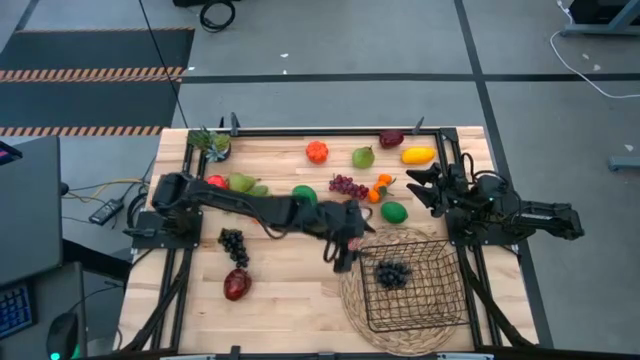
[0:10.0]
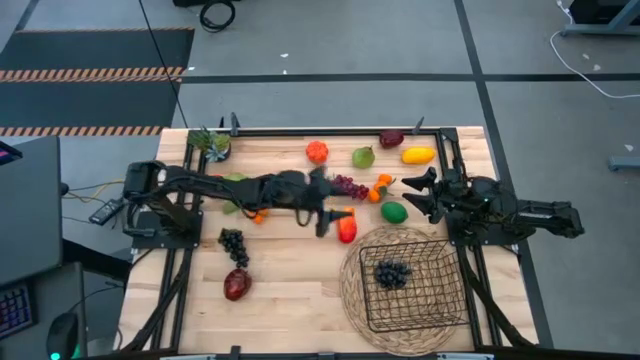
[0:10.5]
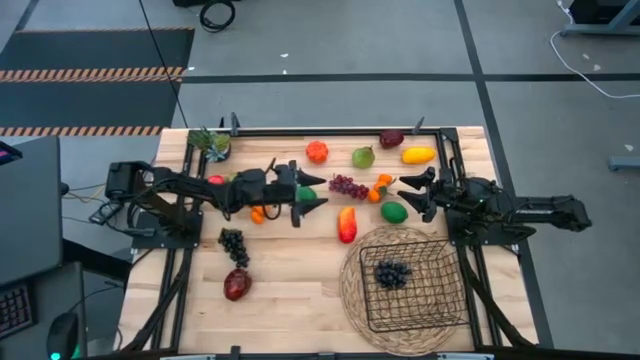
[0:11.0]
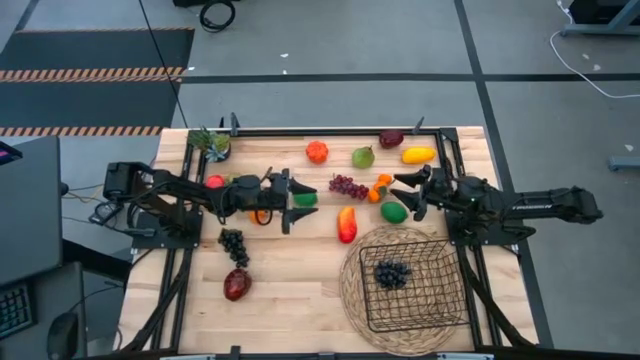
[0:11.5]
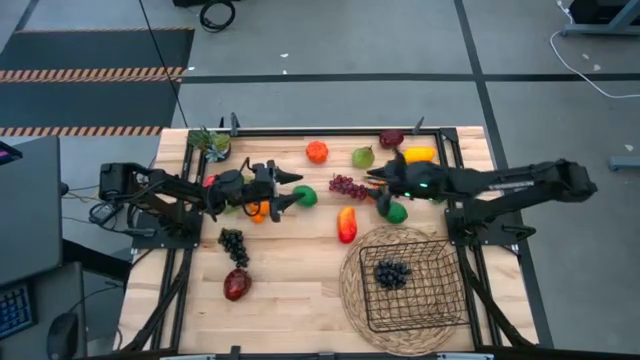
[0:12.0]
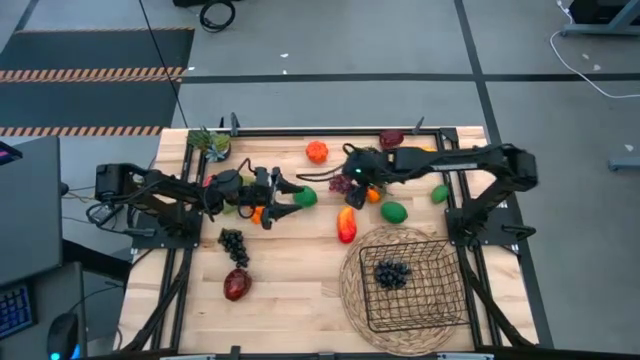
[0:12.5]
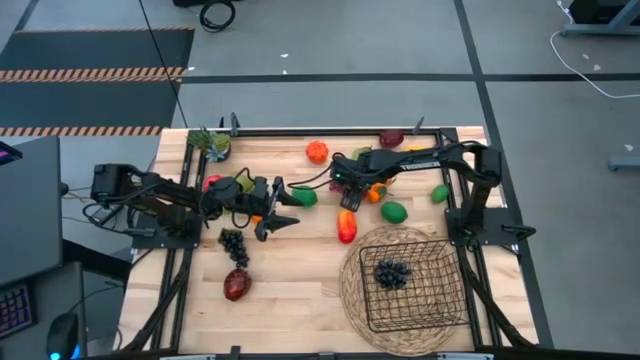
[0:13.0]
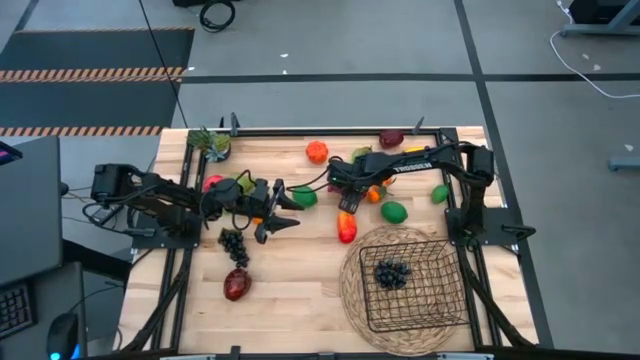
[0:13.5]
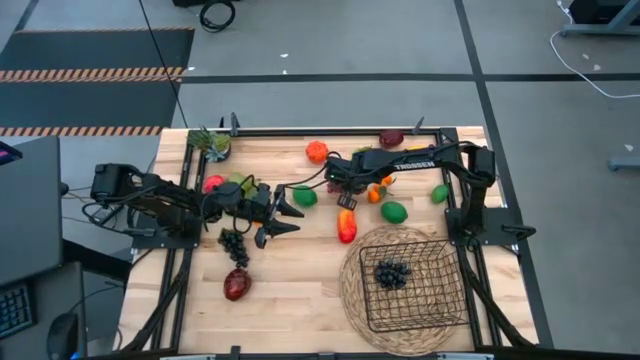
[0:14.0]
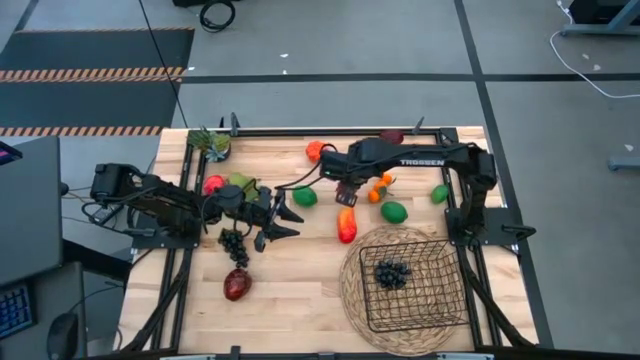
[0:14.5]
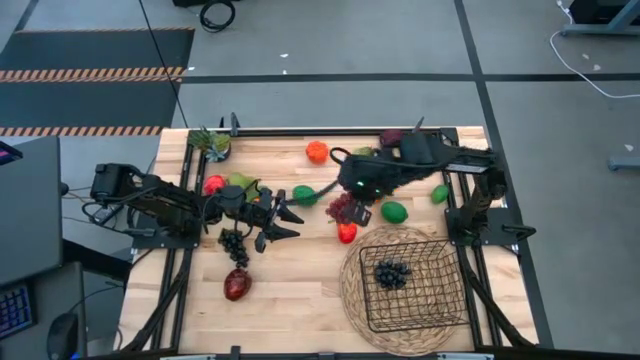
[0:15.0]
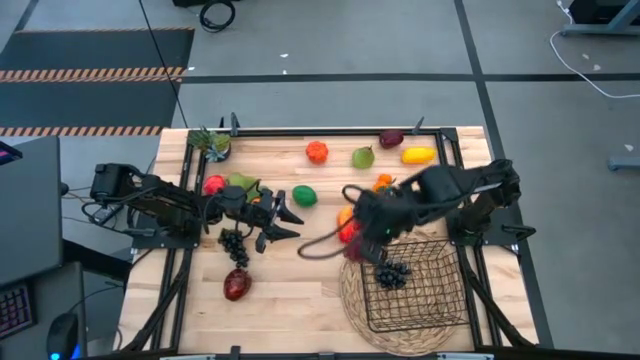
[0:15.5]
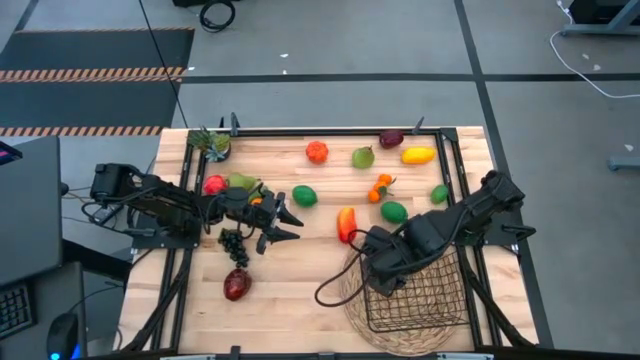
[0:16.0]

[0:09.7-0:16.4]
Task: Build produce basket
Put the red grapes into the black wire basket

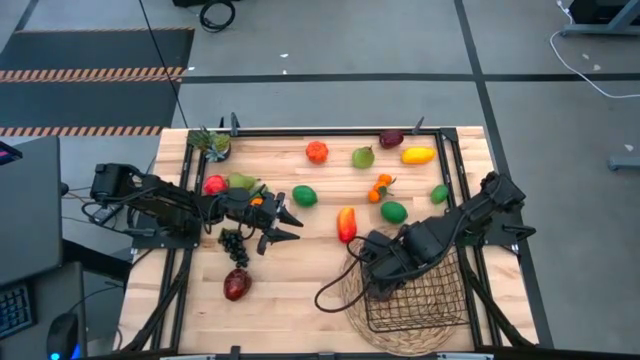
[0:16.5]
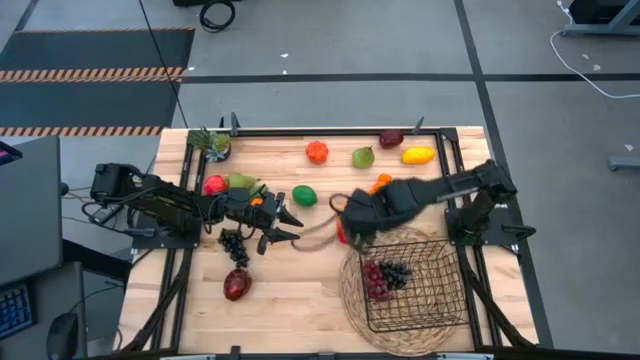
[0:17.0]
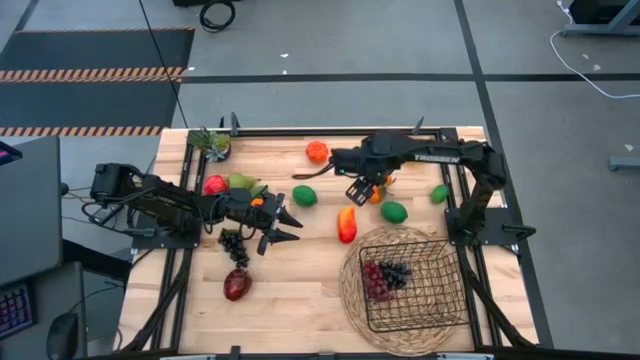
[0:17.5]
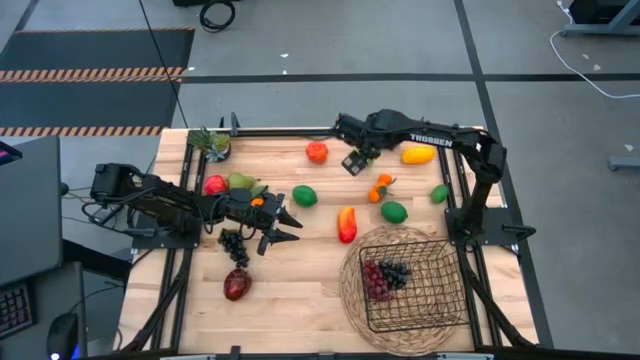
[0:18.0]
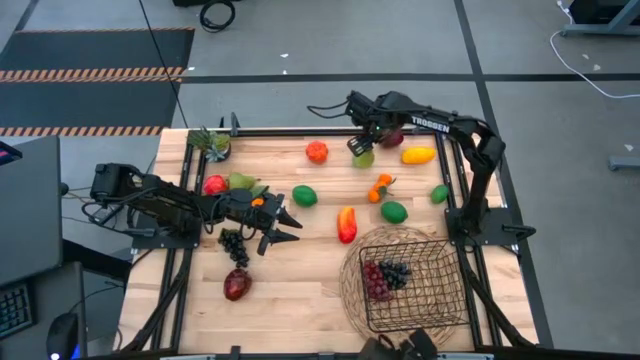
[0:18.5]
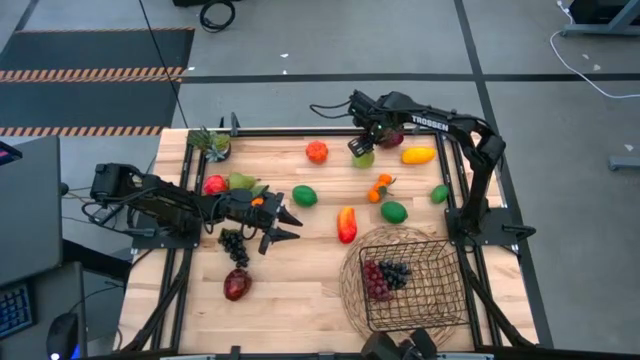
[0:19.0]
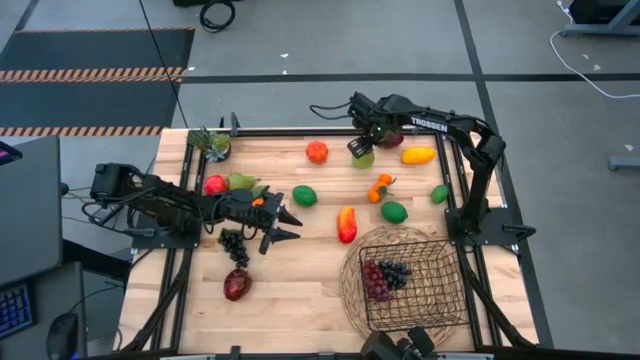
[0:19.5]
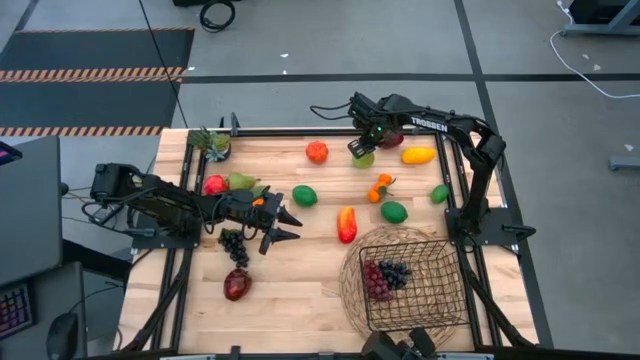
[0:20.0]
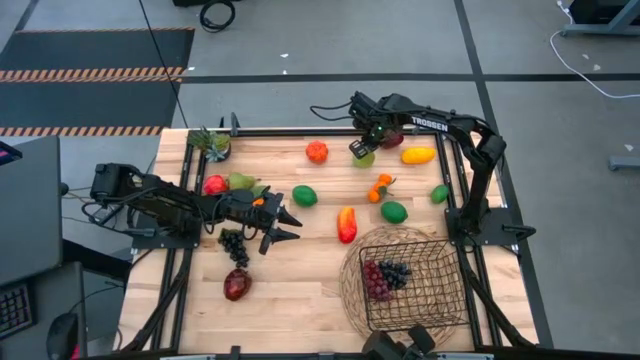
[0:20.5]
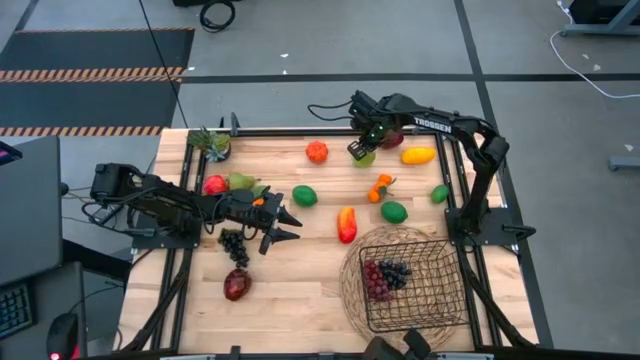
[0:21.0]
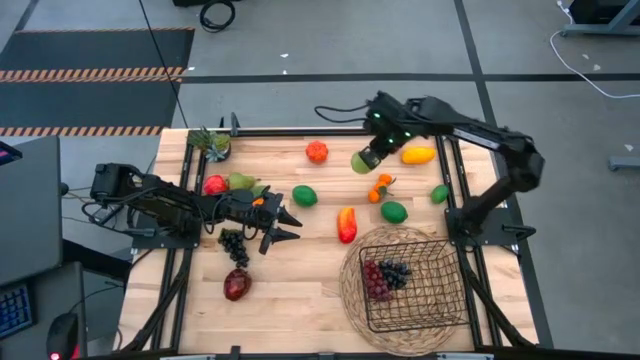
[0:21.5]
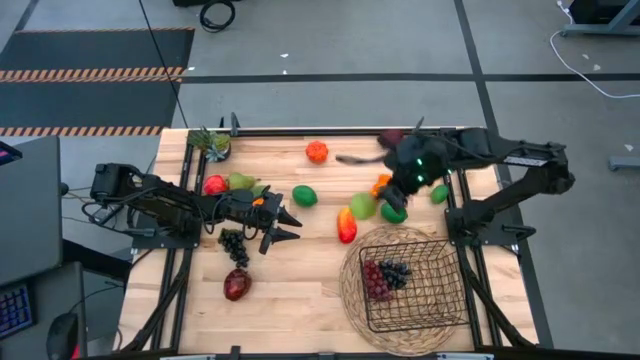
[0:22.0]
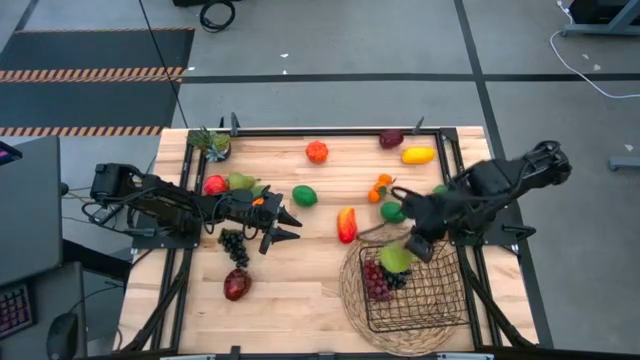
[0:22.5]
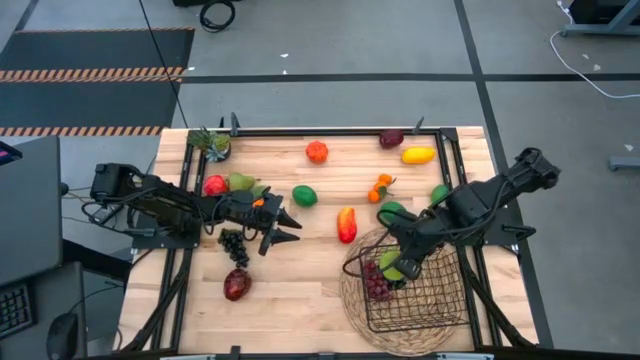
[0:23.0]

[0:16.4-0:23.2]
Put the right green pear into the black wire basket

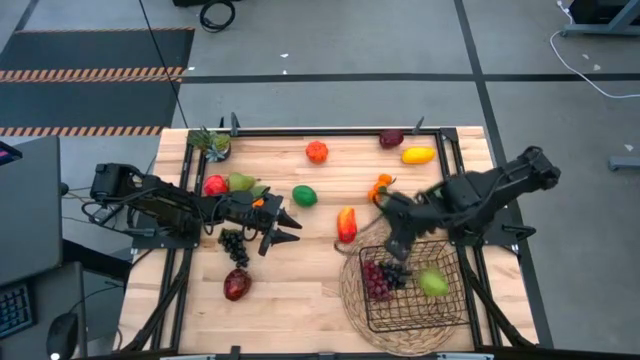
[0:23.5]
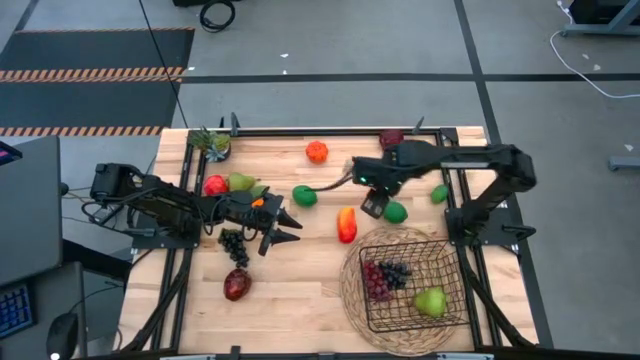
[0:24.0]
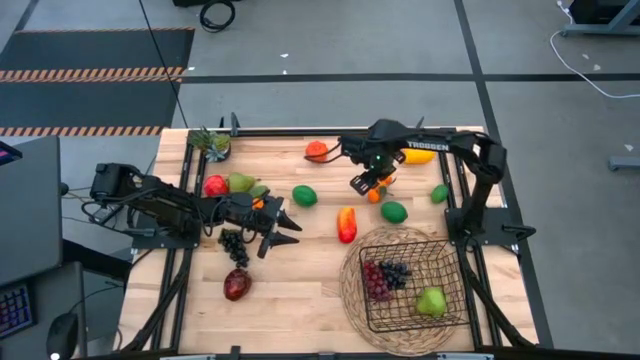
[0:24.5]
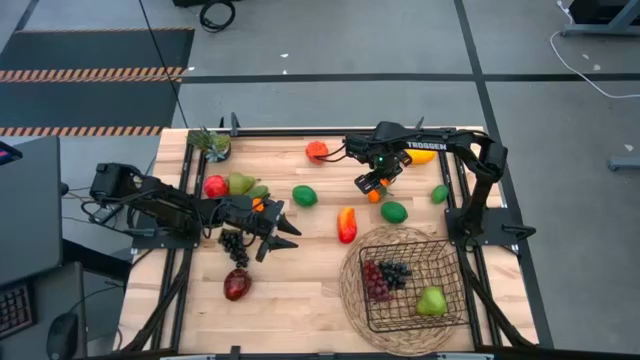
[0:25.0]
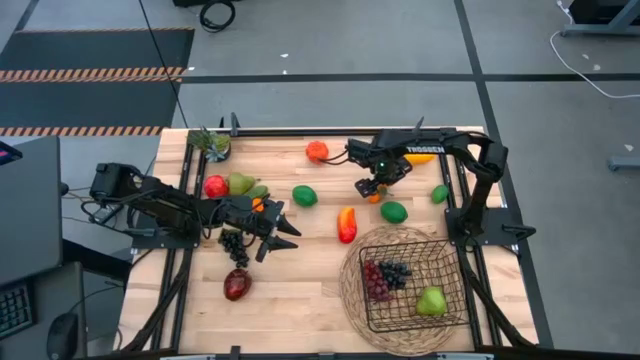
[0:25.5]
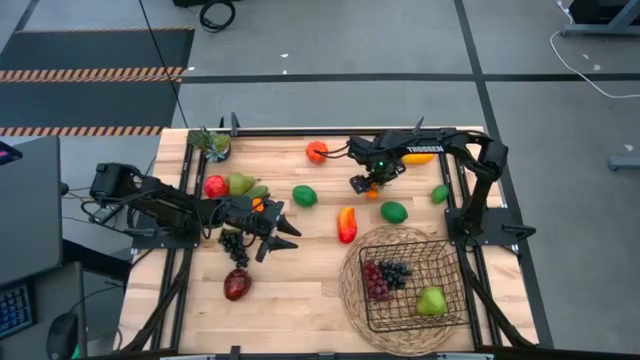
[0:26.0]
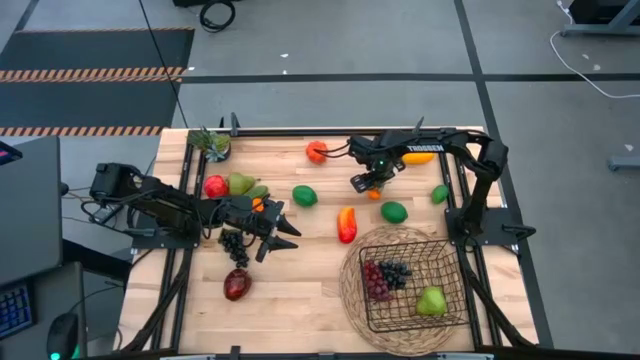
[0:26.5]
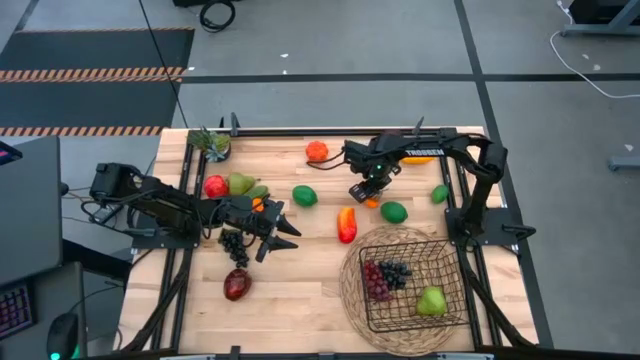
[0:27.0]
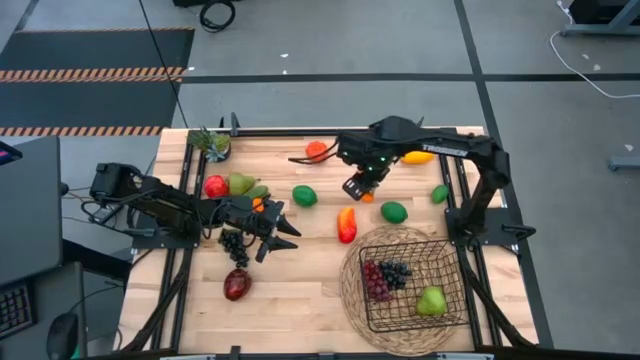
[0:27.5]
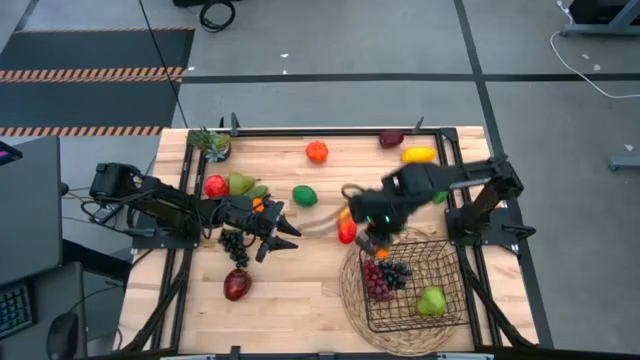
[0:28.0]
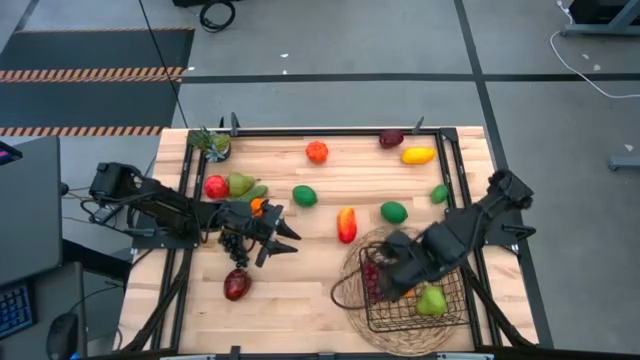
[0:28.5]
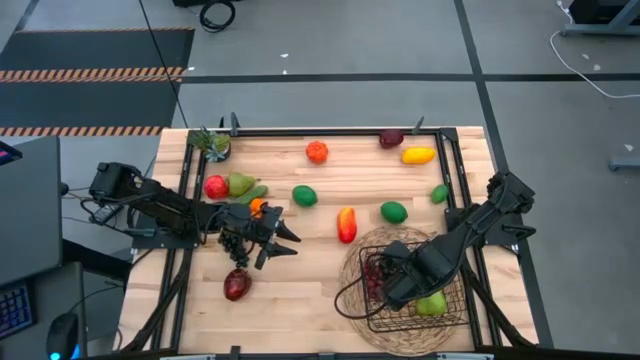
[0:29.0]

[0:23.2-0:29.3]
Put the right orange tangerines into the black wire basket

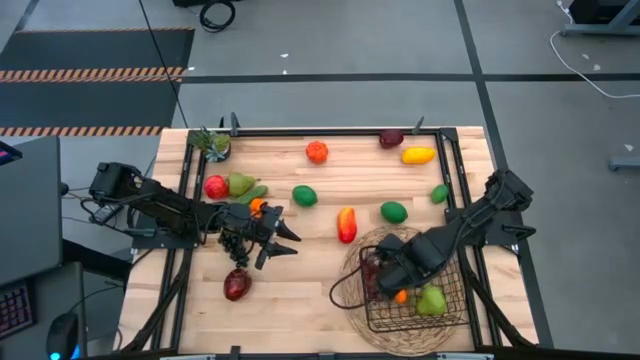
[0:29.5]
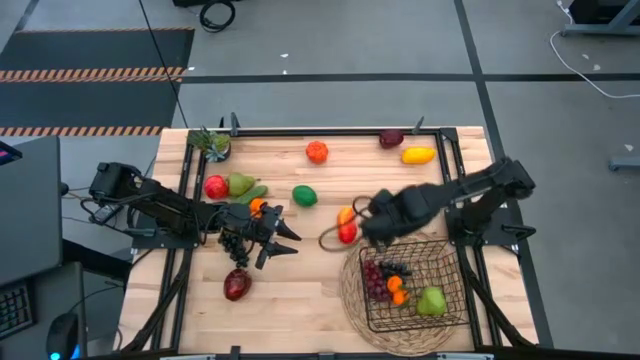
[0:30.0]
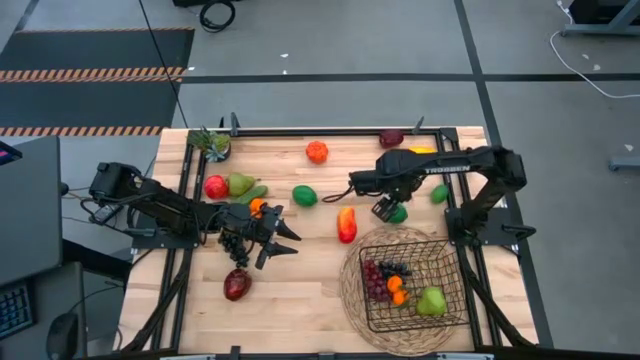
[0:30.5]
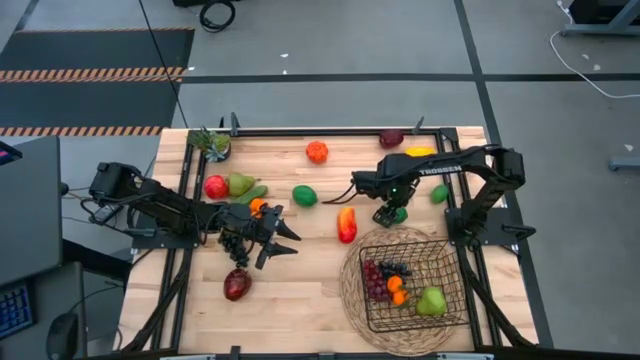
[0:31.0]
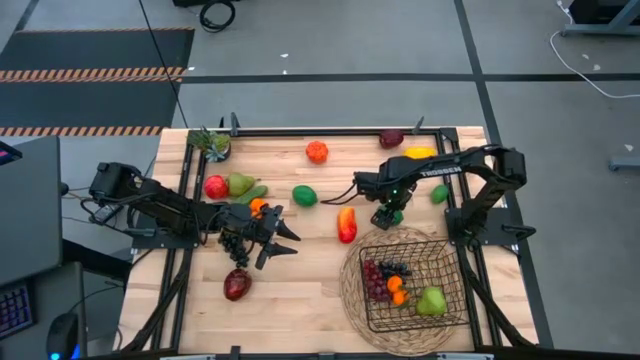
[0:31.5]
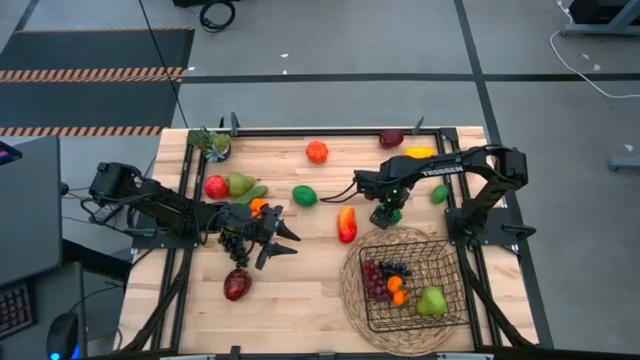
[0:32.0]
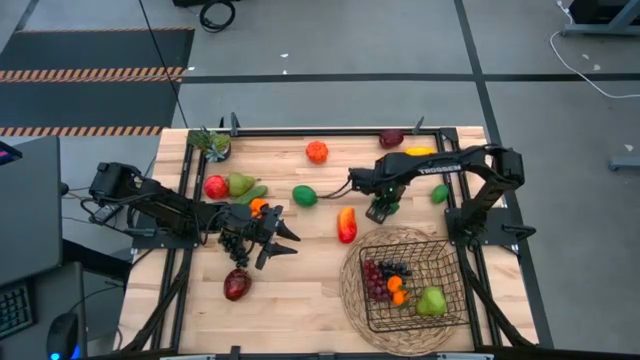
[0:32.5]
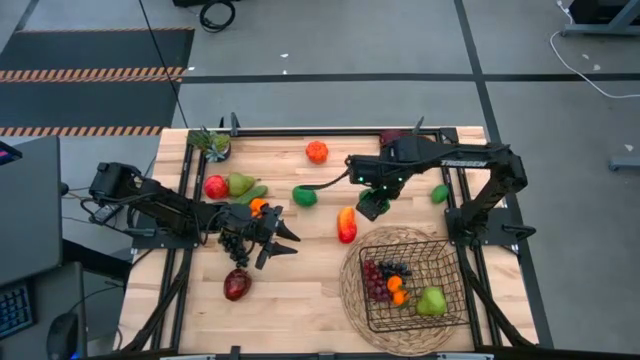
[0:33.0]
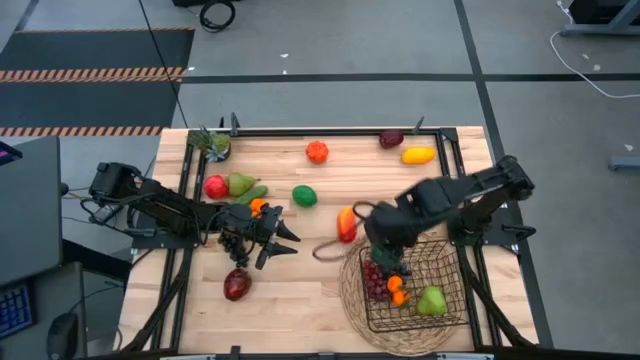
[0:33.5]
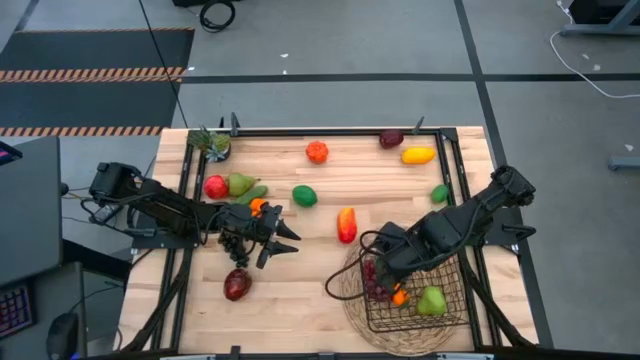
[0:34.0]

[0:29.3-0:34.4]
Put the middle green lime into the black wire basket
